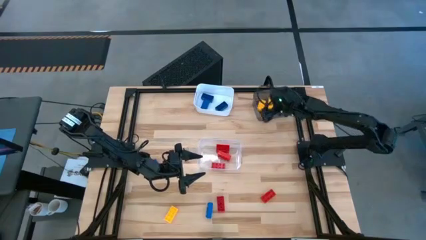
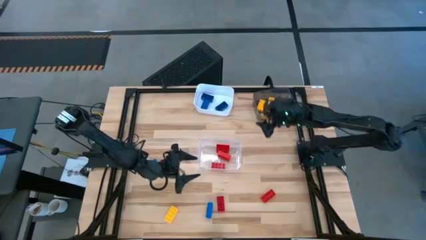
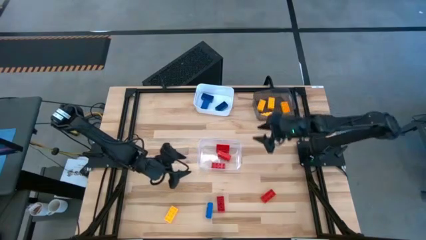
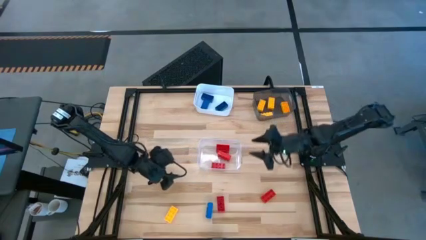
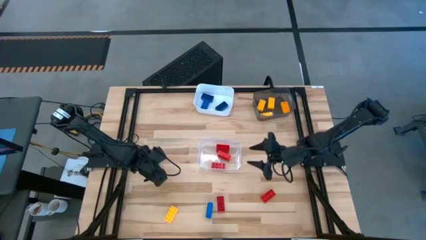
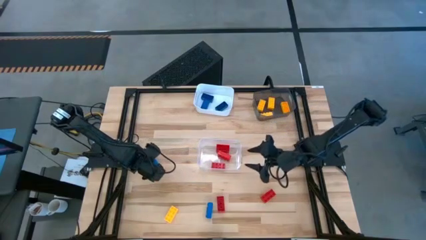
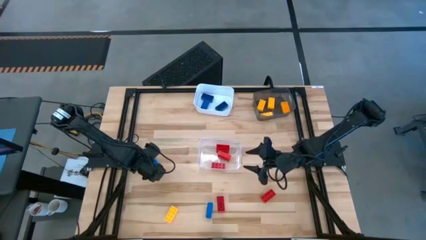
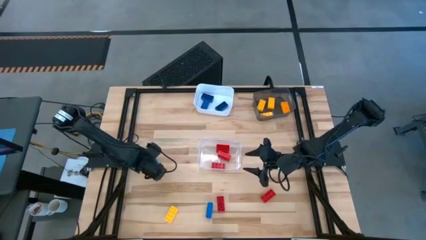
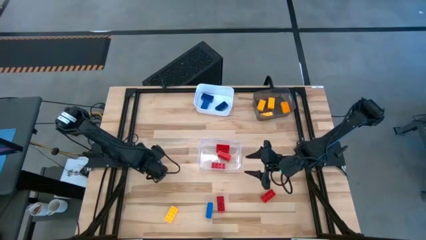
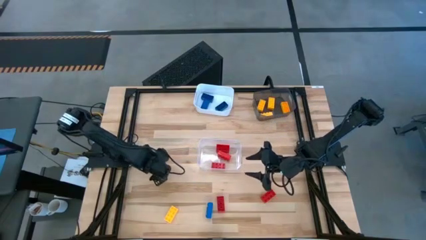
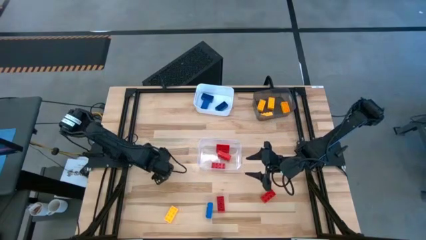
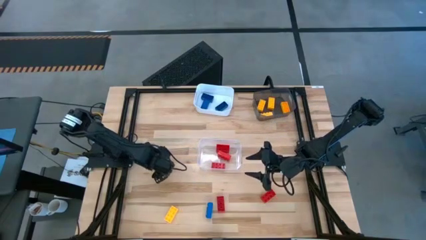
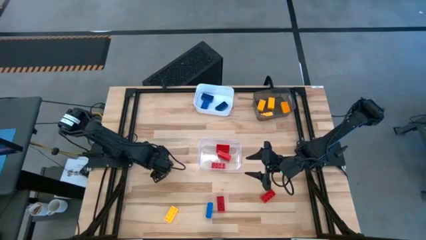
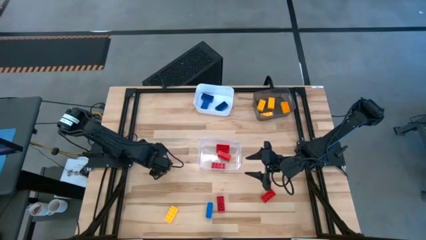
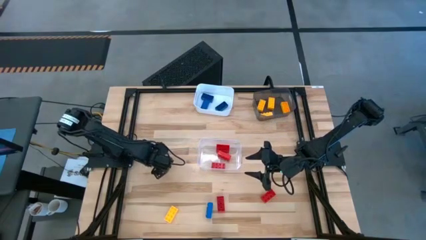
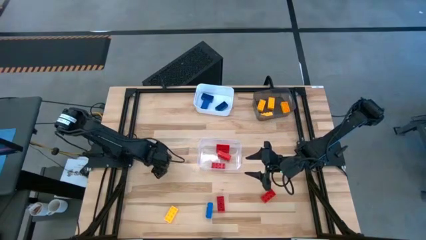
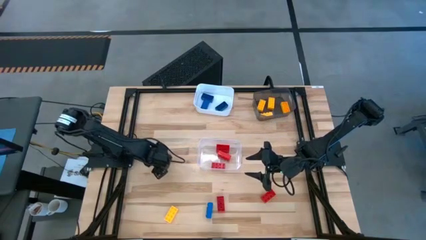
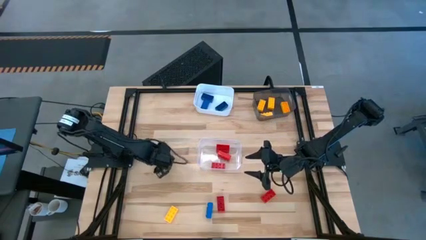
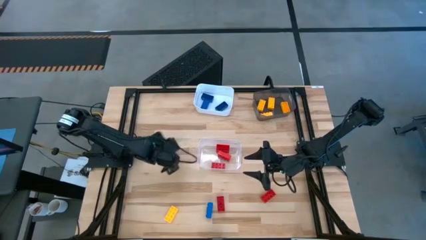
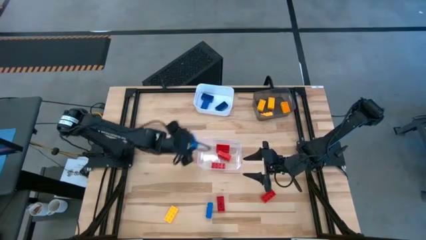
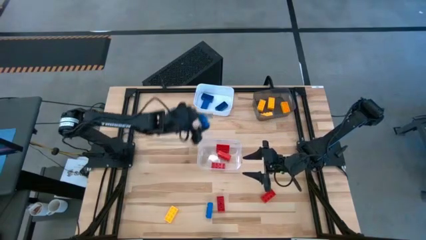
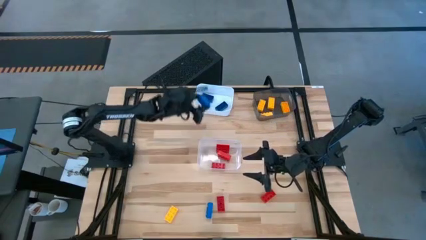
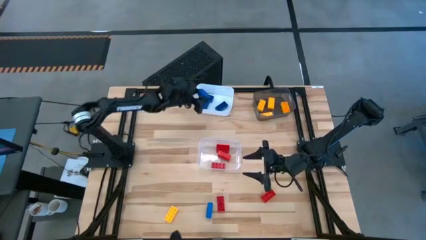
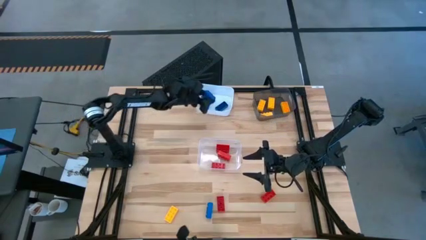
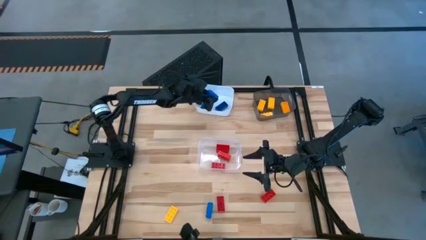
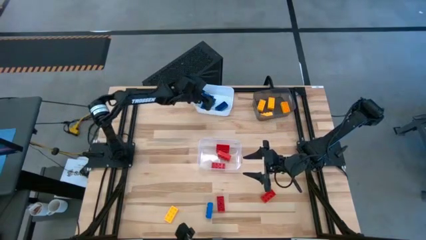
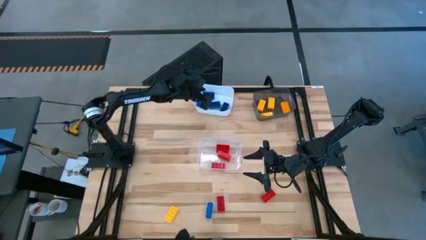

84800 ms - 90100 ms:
Task: Sort & place blocks by color
Put the top blue block into the white bin

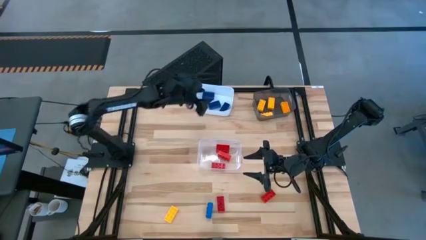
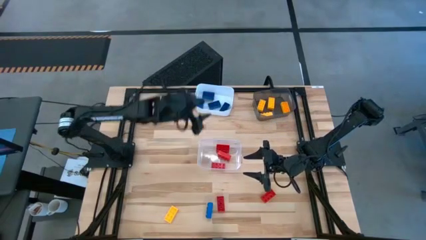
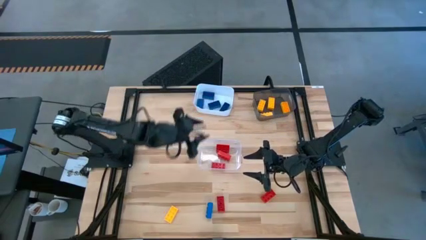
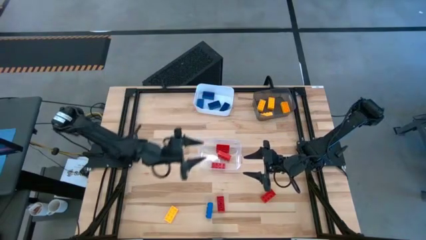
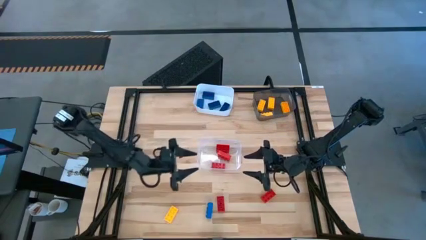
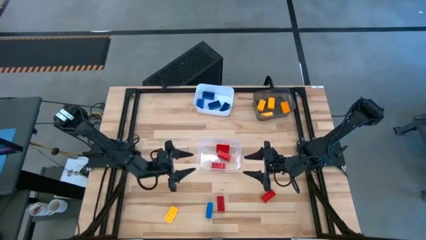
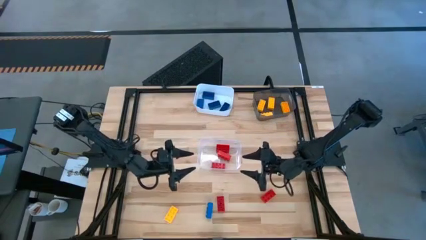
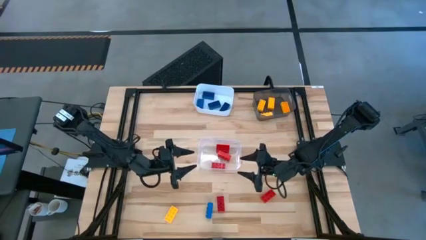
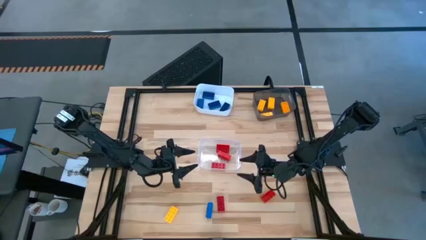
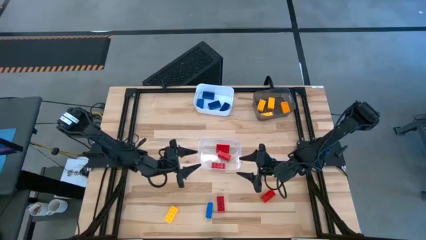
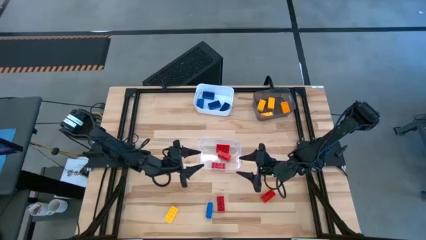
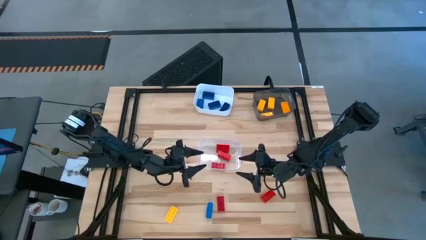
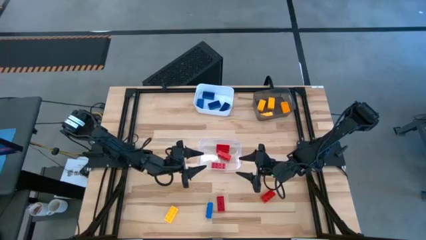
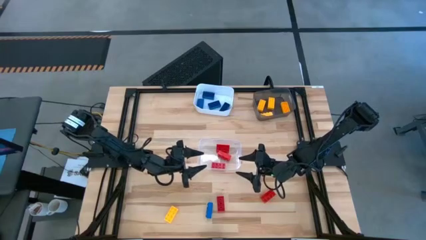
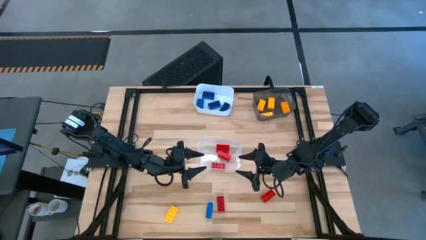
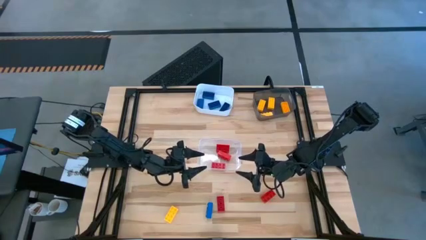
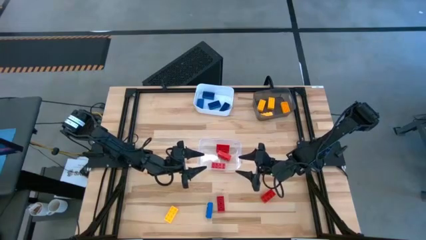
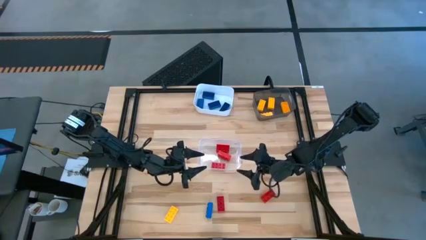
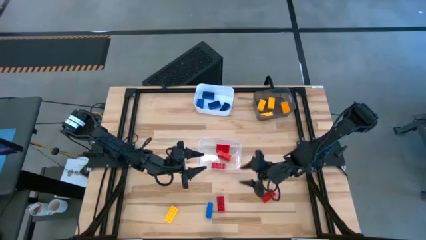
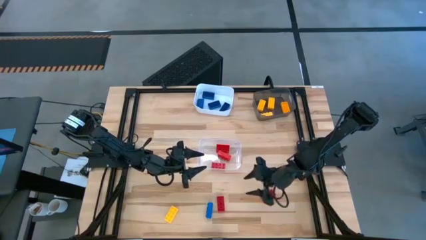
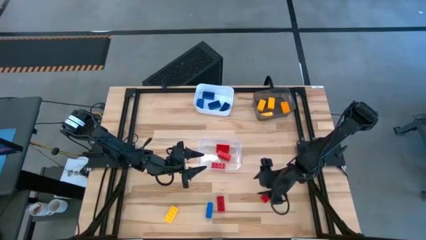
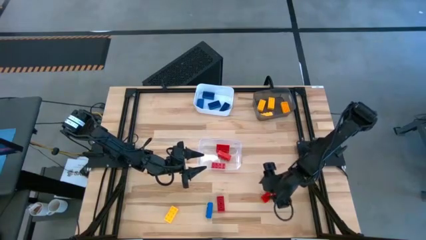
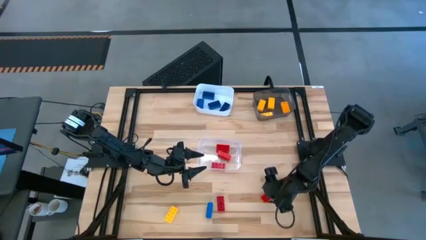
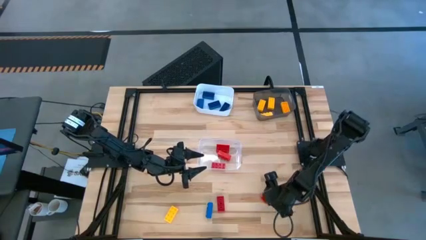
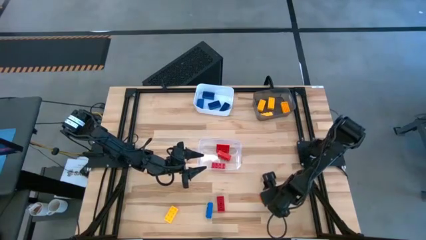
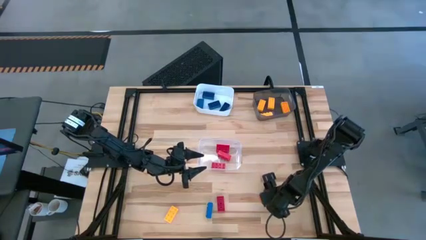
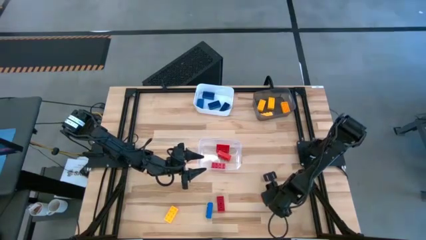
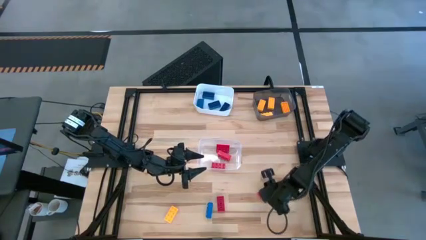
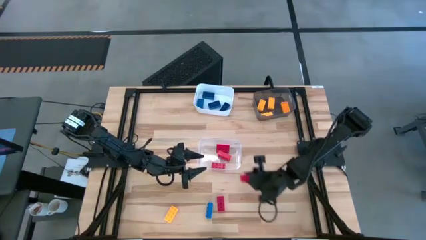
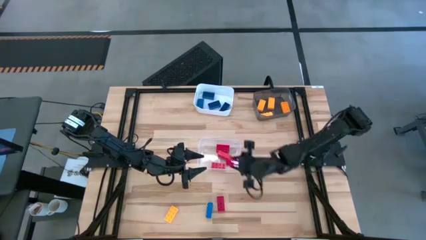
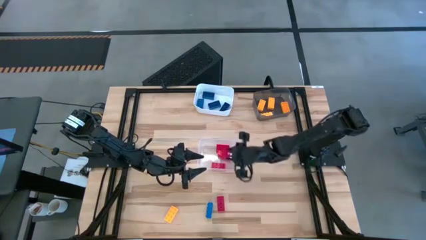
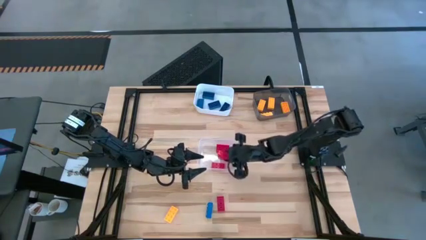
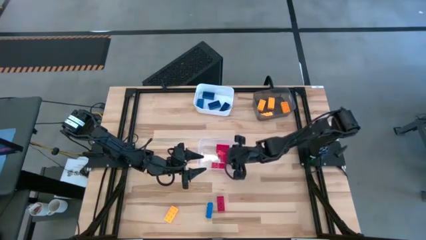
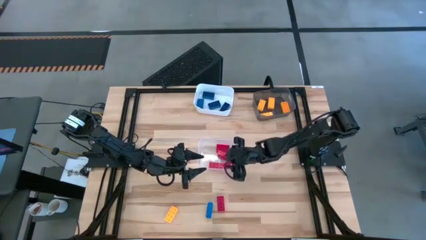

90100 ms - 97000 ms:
Put the right red block into the transparent bin
